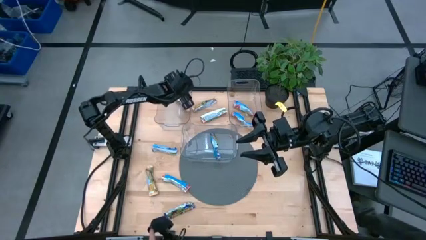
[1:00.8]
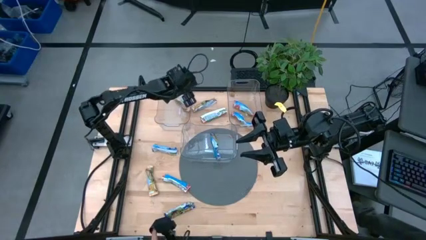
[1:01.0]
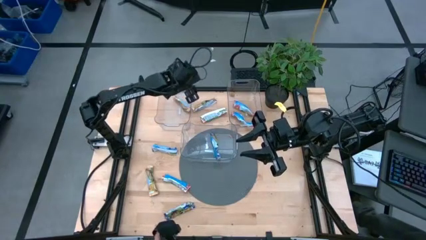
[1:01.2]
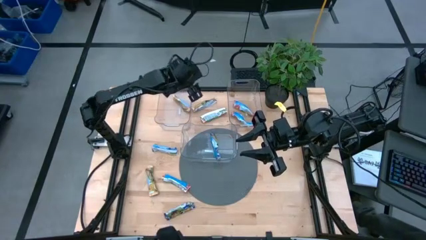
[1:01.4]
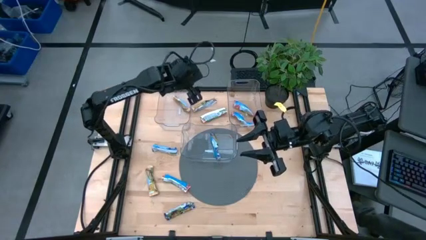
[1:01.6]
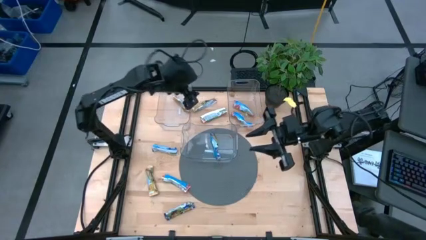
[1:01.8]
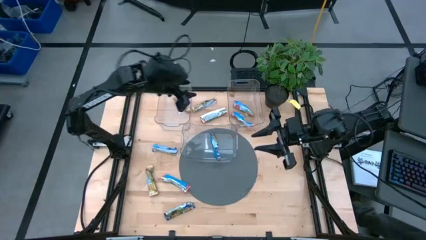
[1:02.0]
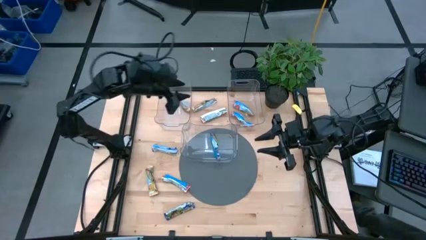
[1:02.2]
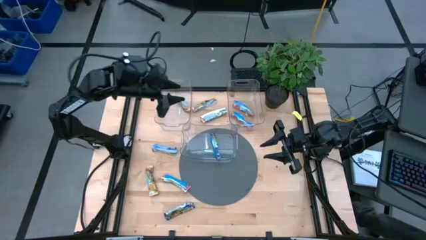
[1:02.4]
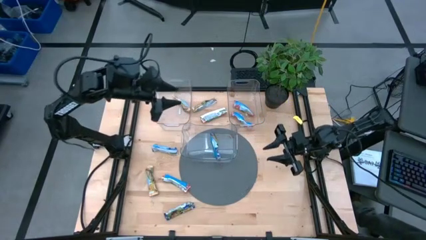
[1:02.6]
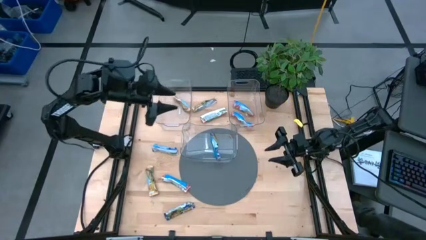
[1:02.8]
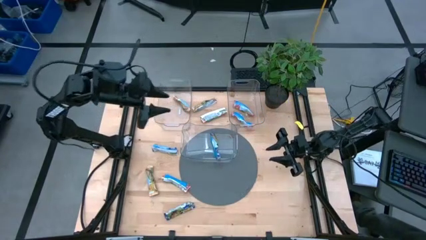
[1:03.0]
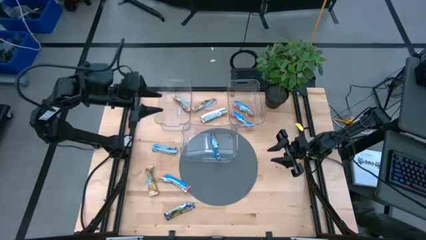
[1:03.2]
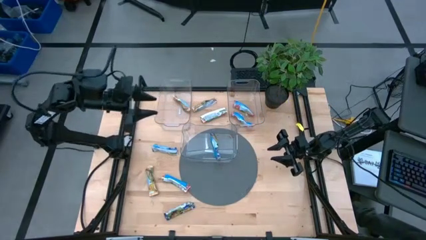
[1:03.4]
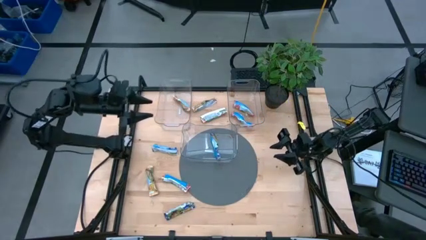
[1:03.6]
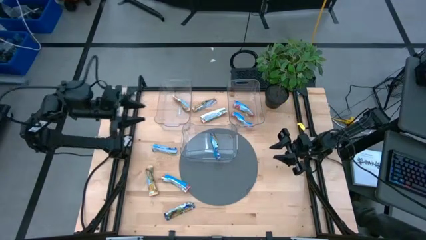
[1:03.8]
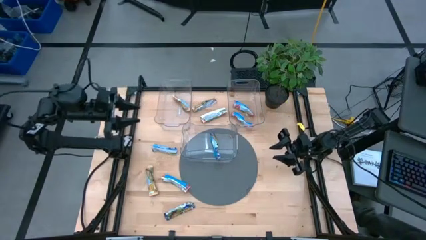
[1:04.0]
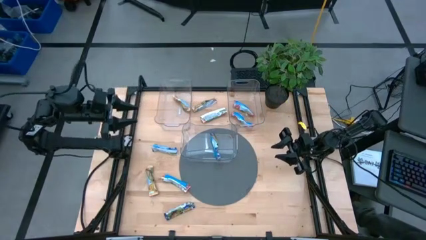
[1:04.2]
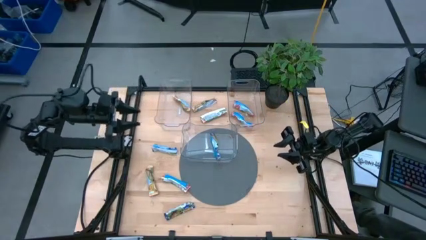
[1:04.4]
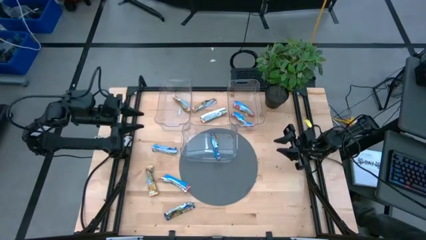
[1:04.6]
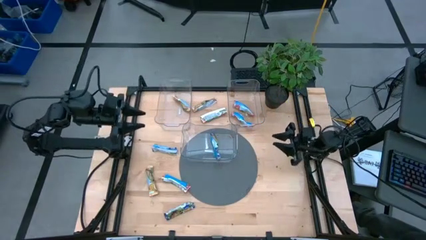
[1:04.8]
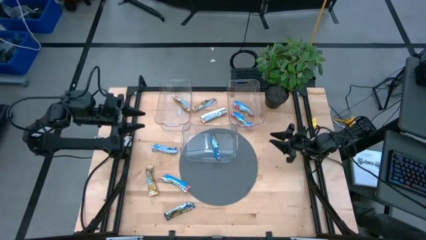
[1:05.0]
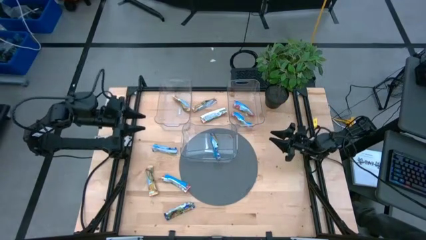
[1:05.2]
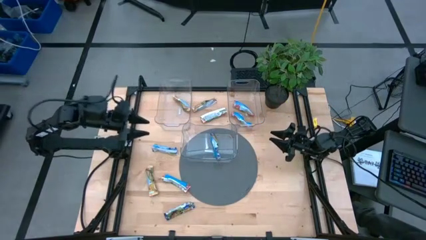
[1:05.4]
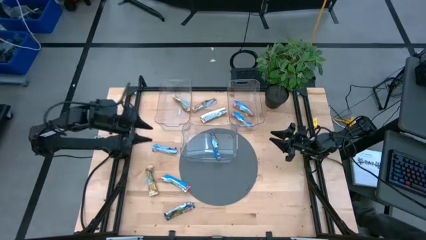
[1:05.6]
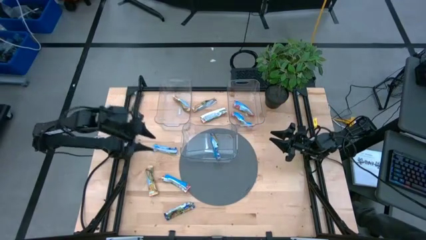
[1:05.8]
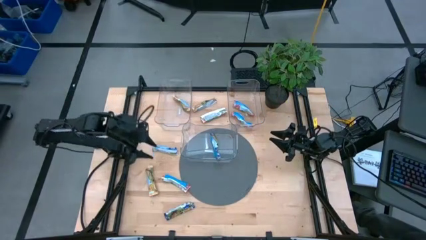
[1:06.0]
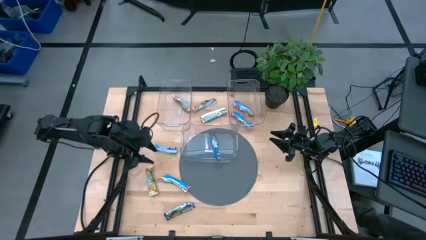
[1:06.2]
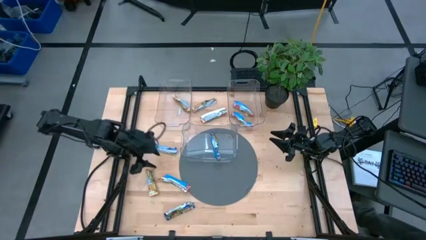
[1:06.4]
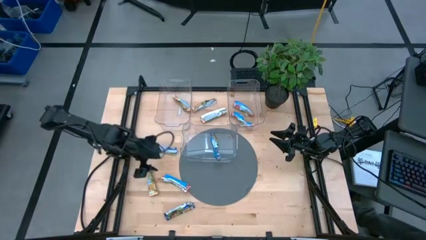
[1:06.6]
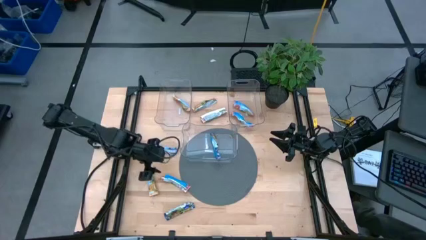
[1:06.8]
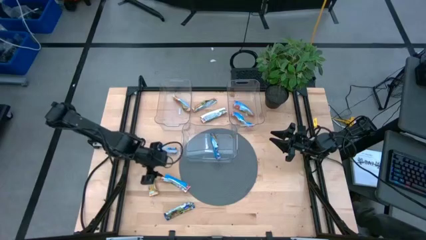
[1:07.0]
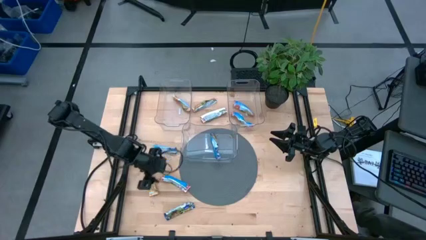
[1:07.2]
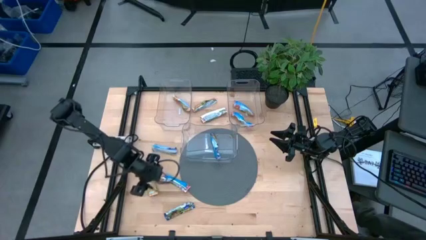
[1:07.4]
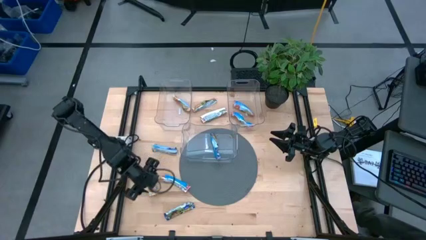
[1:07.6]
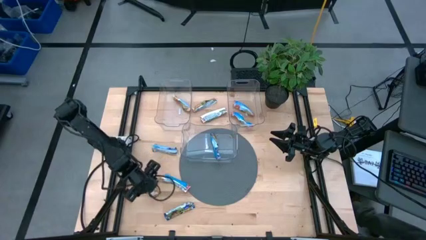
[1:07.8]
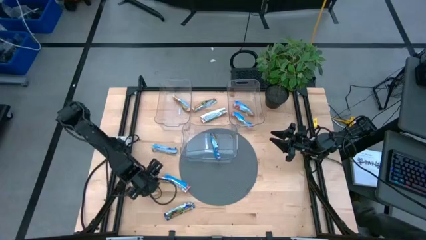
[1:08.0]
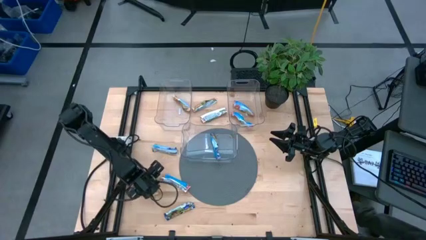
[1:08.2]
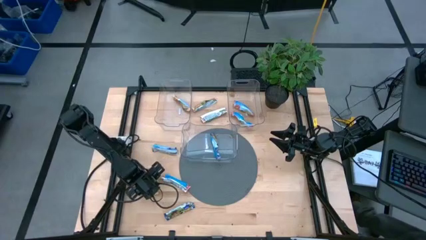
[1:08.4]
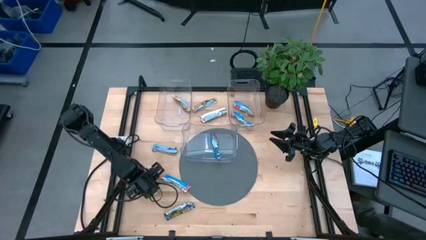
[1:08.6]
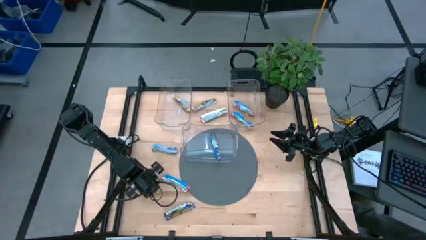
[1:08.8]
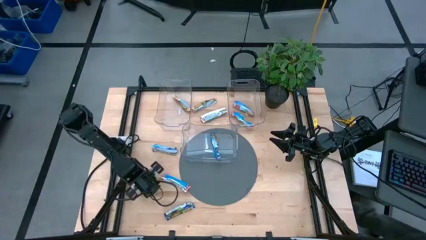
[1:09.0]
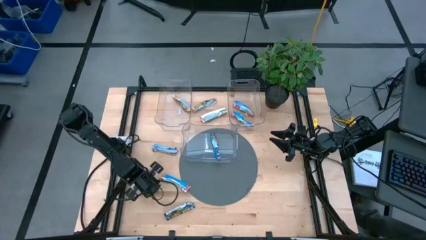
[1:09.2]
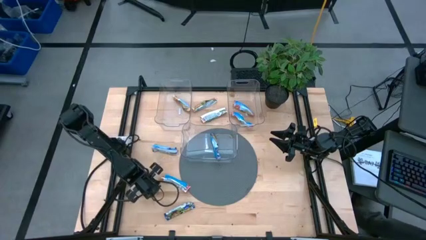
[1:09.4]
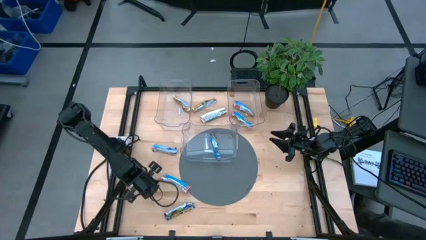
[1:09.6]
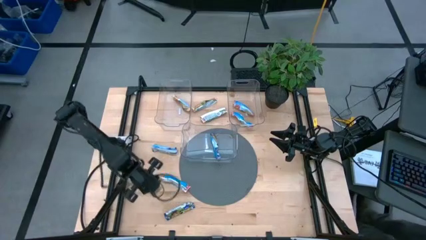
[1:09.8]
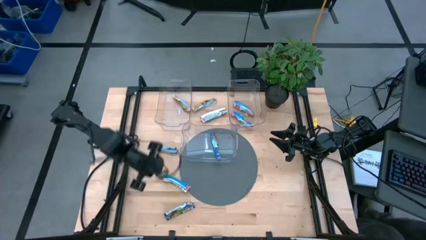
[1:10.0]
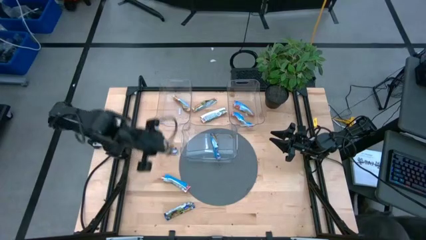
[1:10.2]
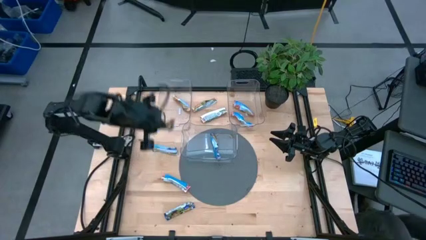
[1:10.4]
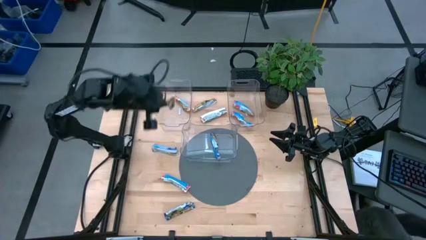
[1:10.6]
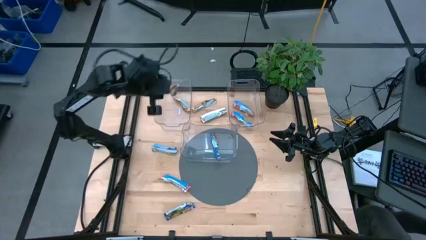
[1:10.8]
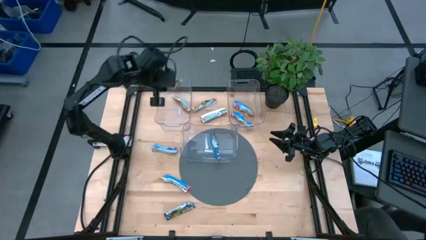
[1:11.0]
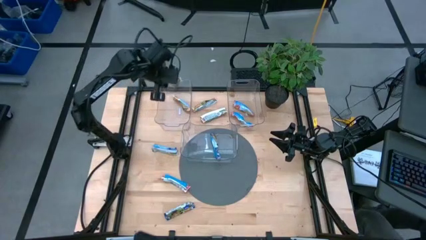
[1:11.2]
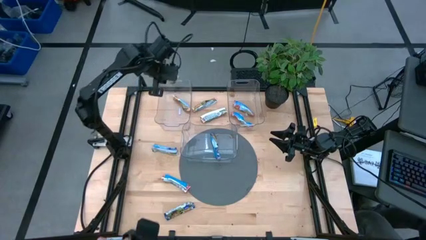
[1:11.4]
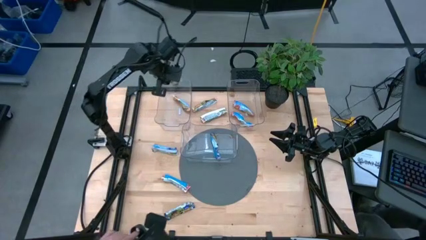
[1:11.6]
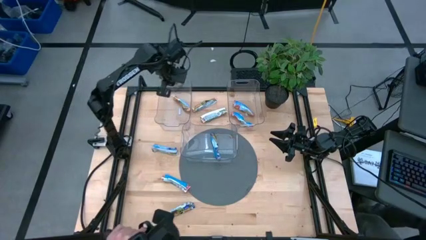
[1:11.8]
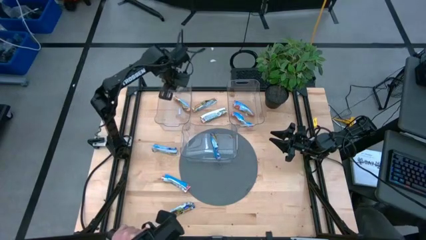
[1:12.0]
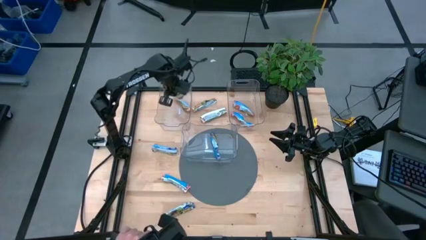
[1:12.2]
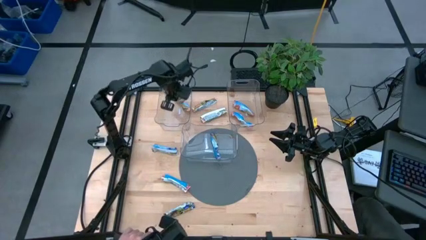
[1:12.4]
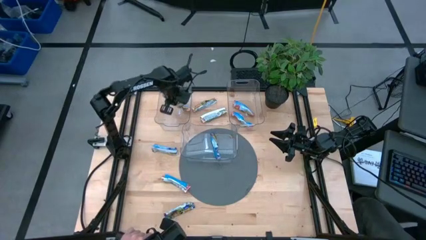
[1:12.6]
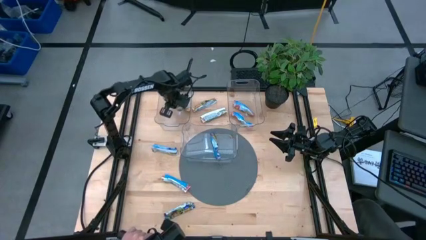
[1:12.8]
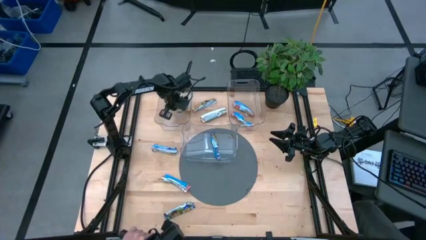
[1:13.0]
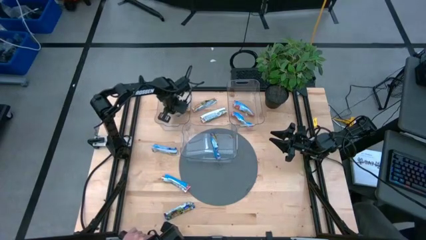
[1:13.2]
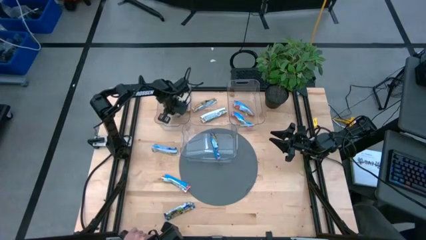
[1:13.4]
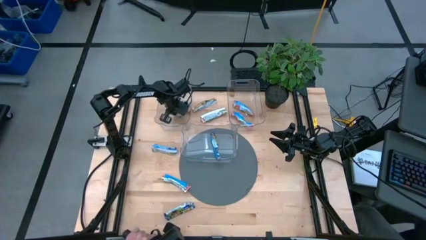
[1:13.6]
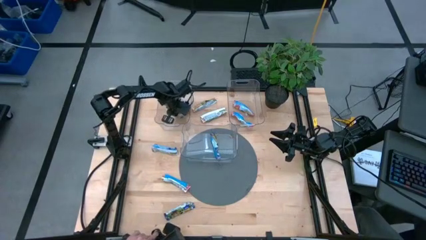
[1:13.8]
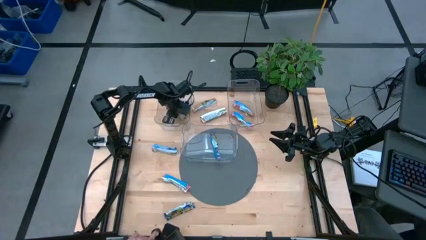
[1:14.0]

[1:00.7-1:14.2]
Task: Pick and place Granola Bars by type
Put the yellow granola bar into the top left transparent bin

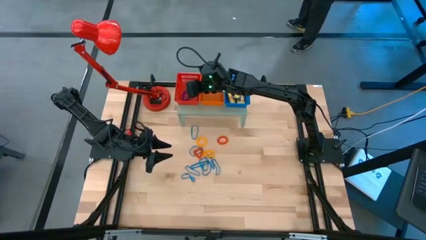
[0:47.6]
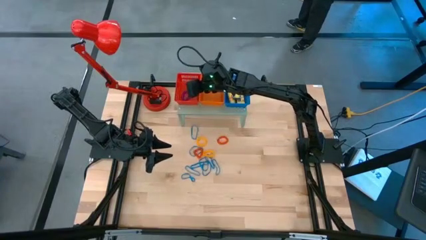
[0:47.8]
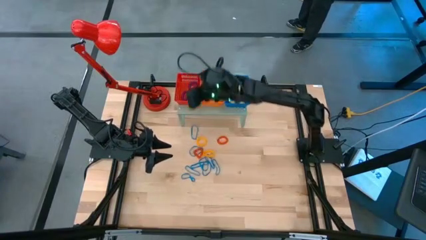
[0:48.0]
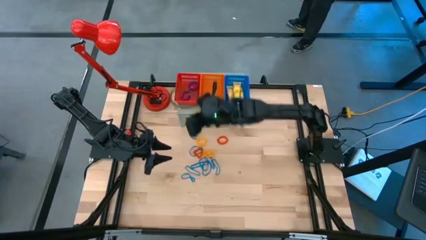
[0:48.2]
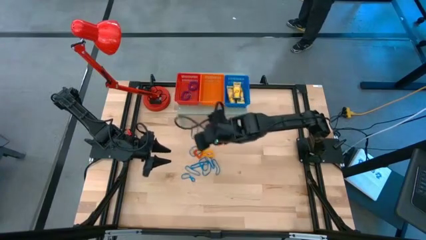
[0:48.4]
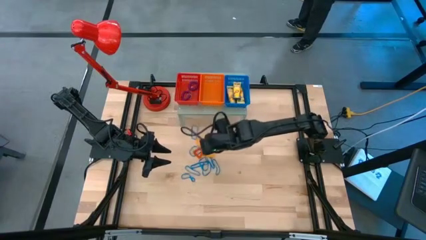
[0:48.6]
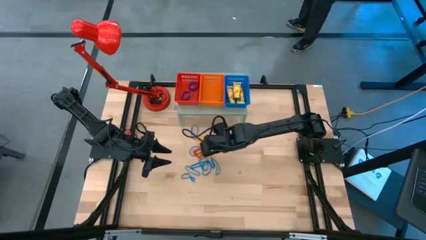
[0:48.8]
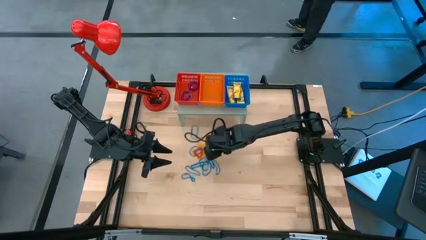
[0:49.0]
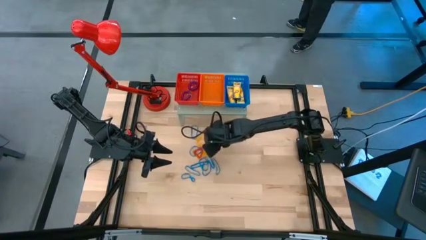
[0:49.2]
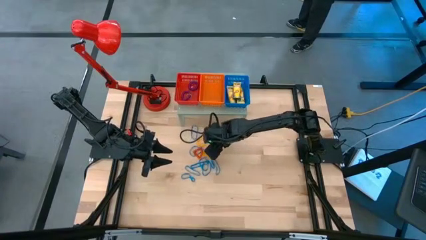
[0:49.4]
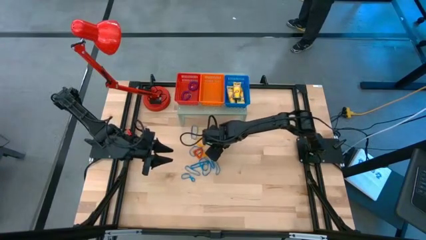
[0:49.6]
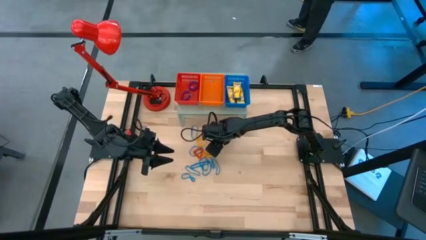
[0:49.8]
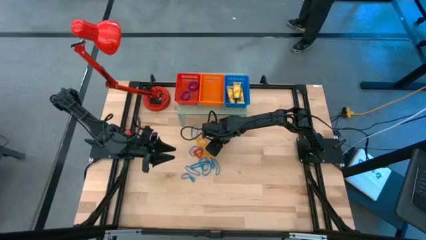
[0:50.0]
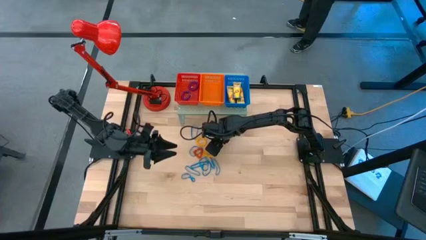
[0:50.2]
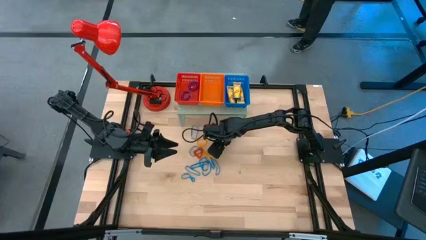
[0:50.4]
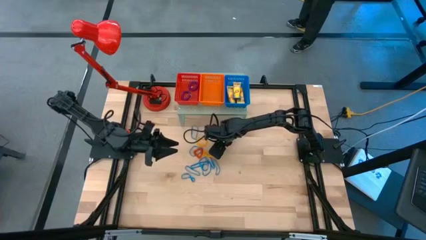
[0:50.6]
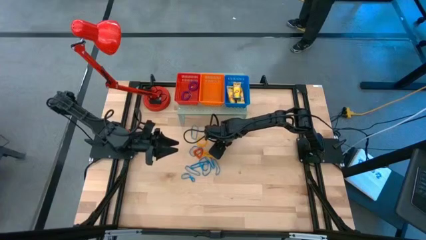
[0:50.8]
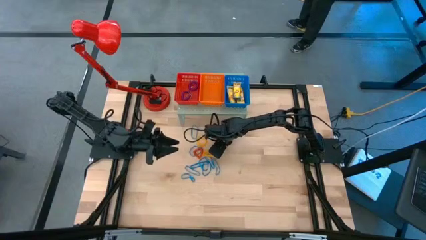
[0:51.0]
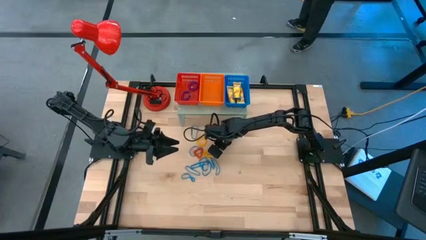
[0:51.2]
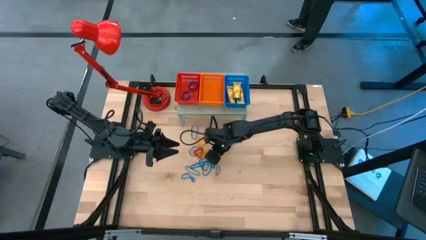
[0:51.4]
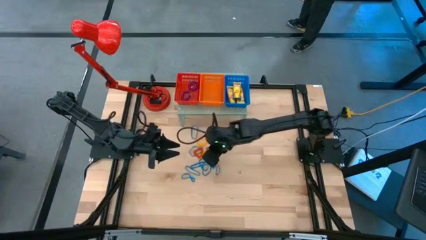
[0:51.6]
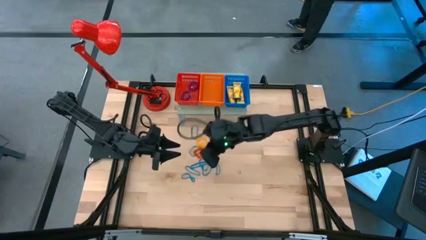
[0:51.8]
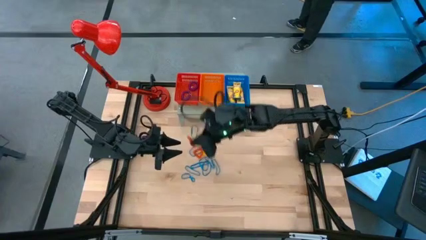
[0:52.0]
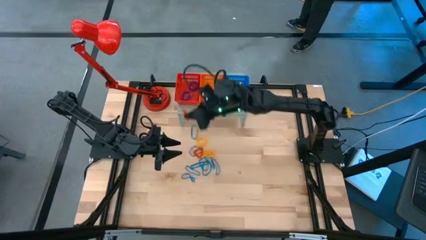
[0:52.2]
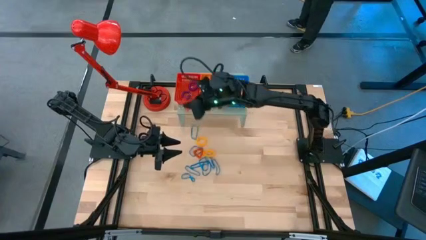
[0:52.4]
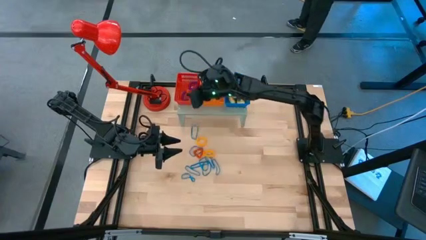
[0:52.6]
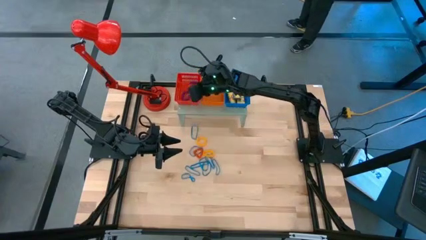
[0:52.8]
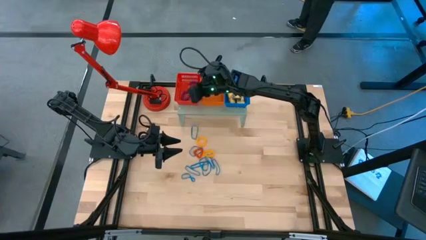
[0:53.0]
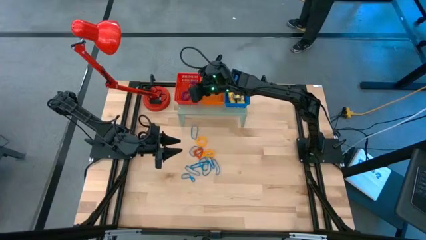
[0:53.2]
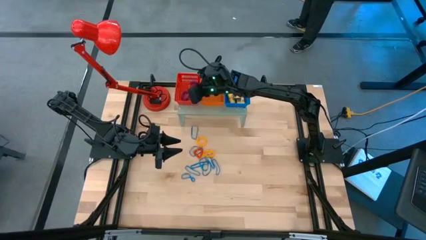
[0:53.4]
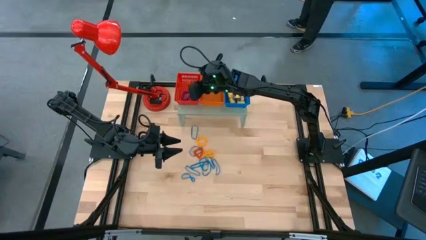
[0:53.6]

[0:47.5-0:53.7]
Task: Pick & Place Office Desk Supplies
Put the orange spring keychain into the red bin on the shelf
